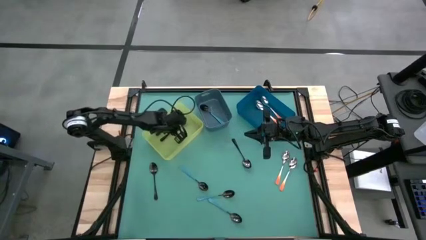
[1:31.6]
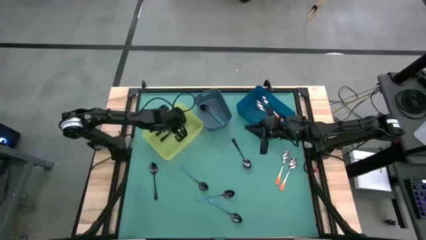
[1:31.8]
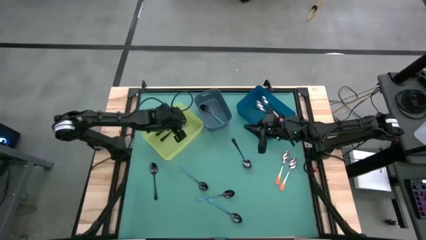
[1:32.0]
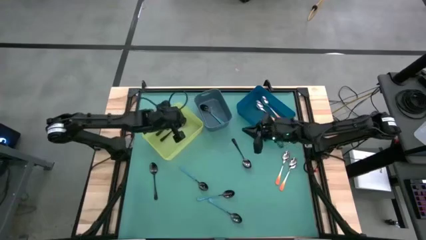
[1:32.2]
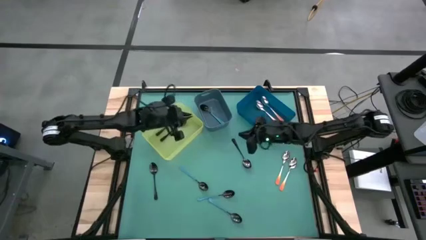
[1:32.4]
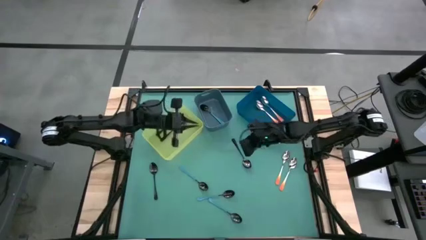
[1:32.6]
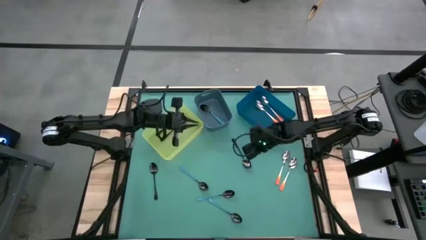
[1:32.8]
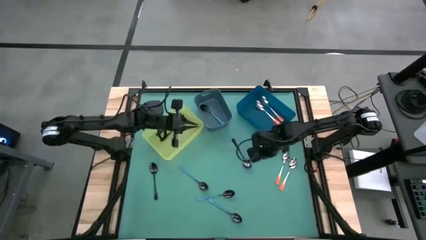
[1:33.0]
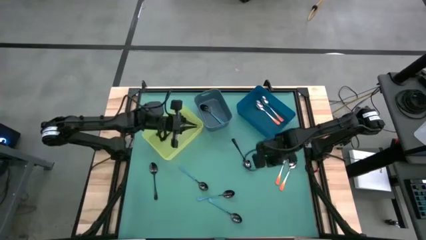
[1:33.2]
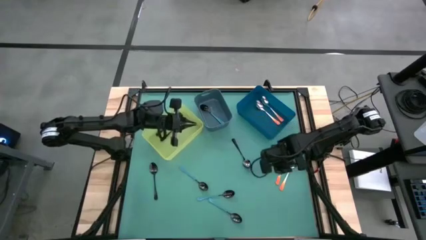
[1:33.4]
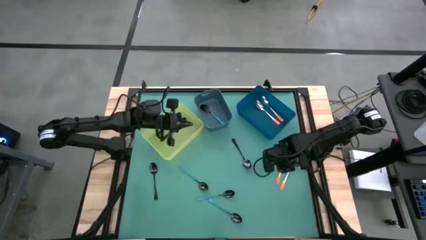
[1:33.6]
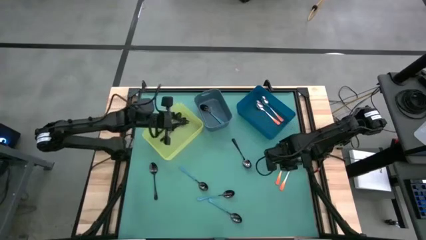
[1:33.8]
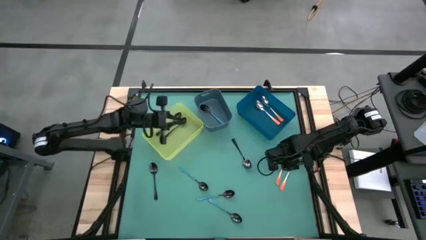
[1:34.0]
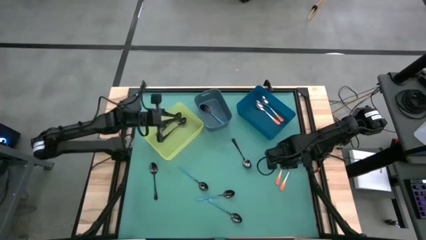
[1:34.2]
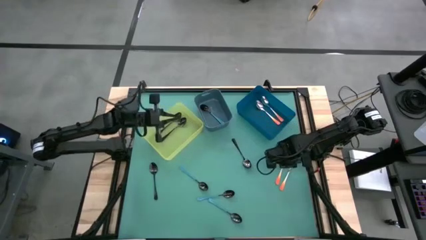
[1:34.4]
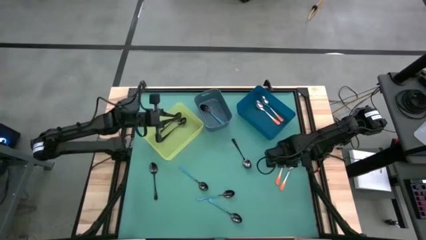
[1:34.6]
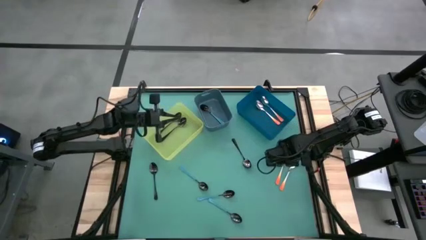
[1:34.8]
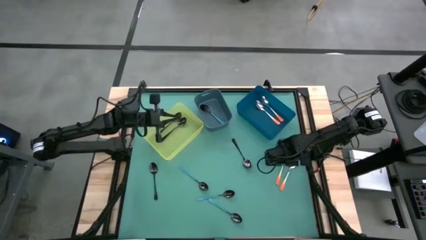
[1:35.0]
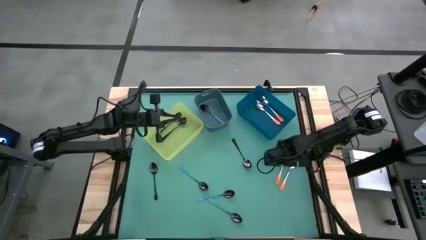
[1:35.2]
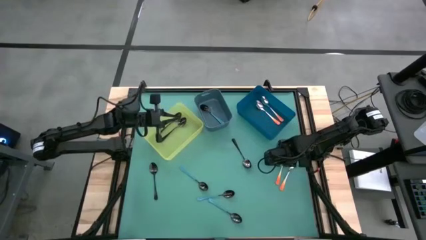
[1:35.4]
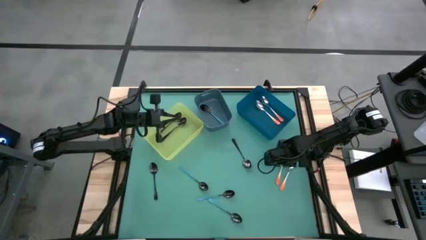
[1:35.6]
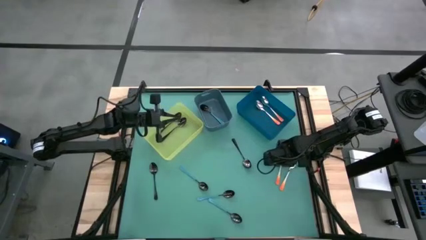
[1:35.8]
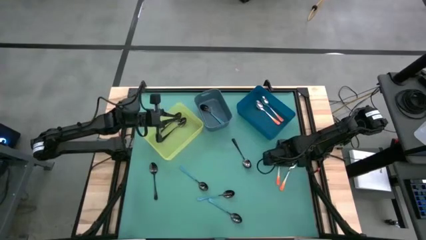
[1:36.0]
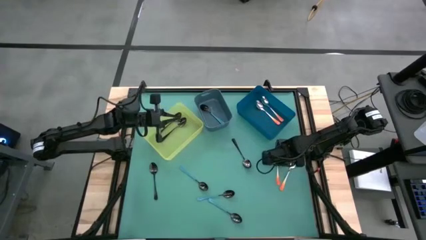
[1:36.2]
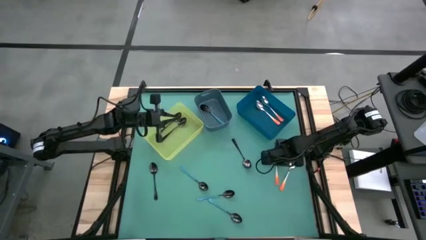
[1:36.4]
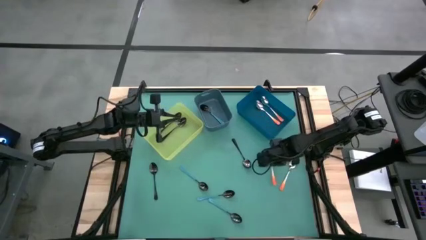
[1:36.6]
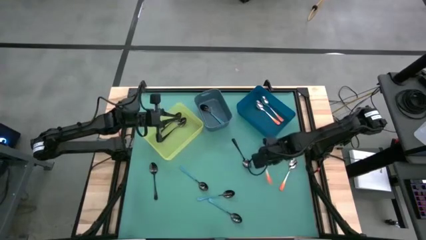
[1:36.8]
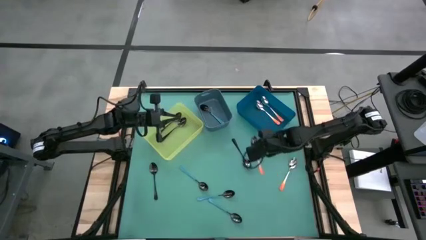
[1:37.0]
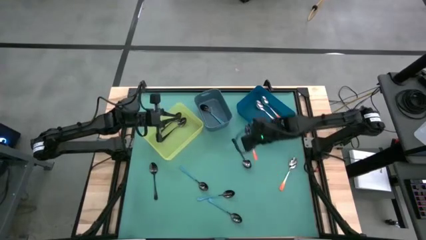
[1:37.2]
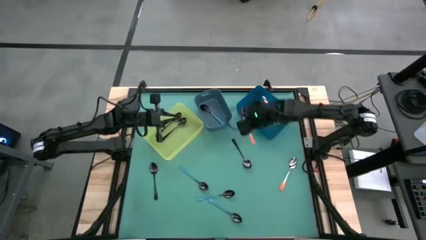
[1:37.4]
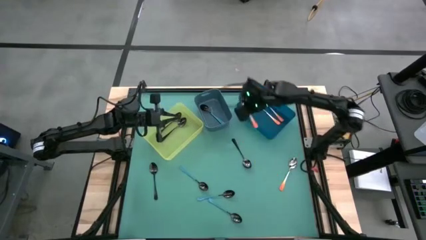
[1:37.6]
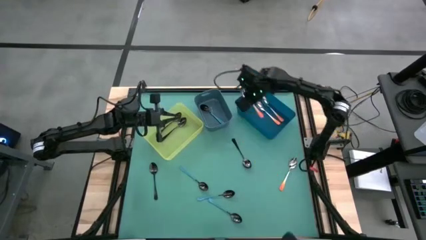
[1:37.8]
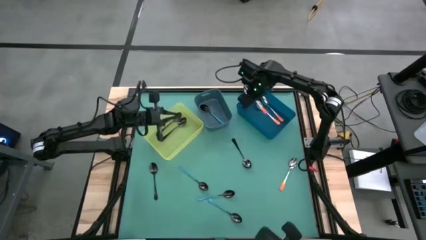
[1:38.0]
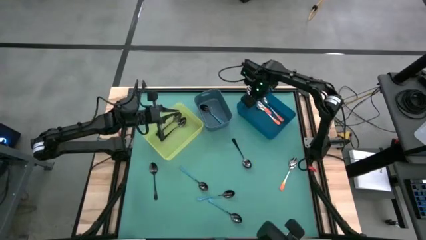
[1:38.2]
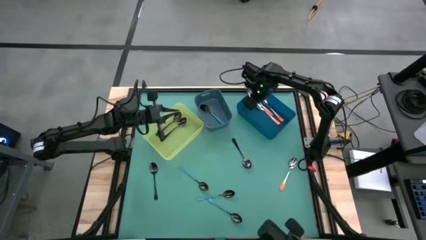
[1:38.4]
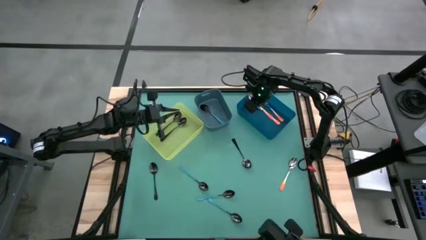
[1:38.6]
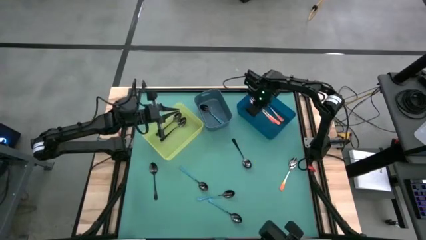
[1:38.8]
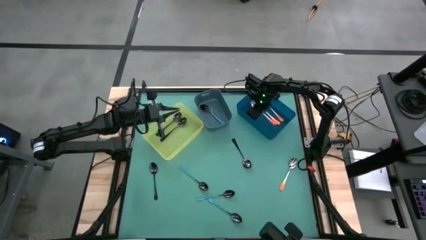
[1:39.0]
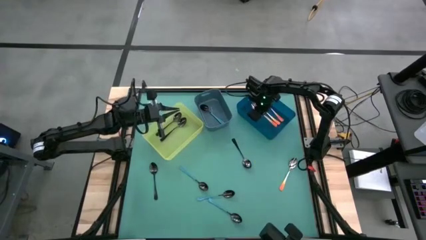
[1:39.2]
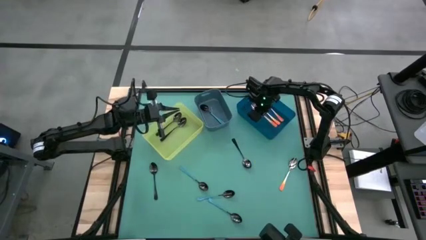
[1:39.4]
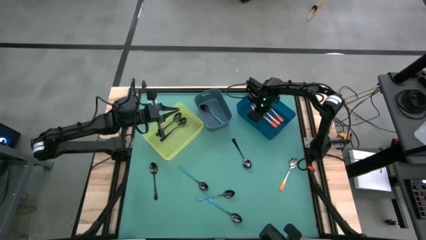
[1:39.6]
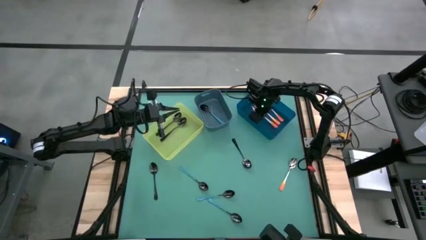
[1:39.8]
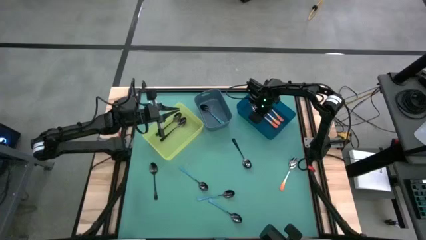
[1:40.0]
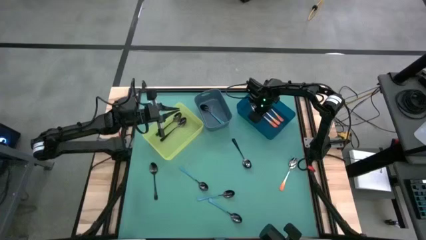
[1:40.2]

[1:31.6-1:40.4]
Task: Sort silverware by color (type)
Put the orange spoon into the blue bin

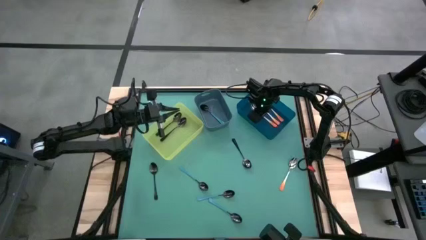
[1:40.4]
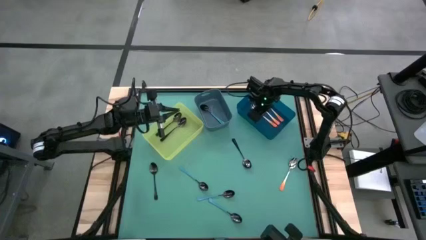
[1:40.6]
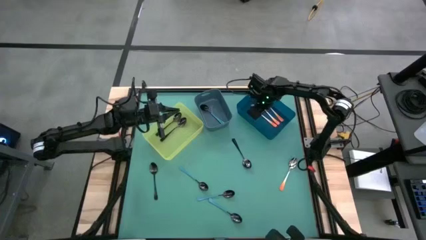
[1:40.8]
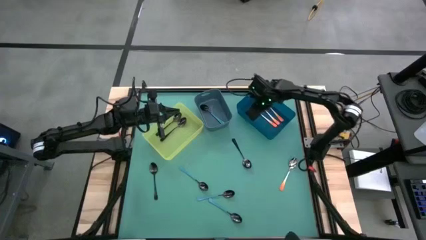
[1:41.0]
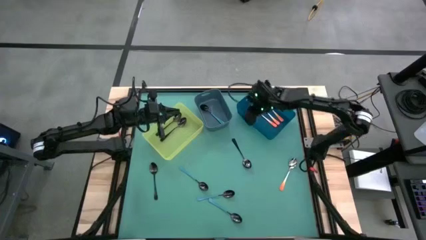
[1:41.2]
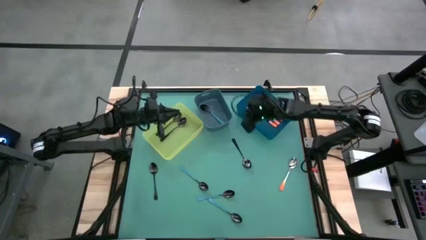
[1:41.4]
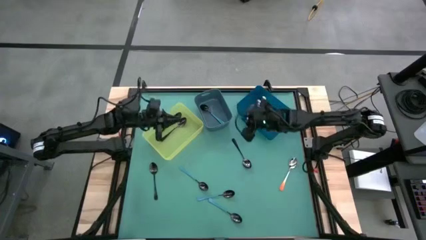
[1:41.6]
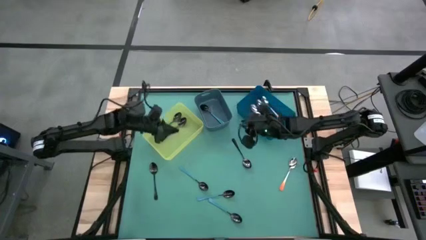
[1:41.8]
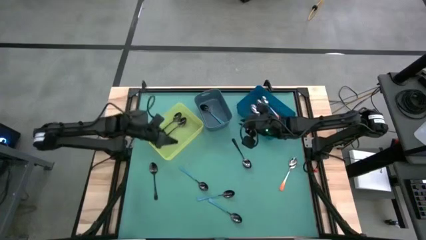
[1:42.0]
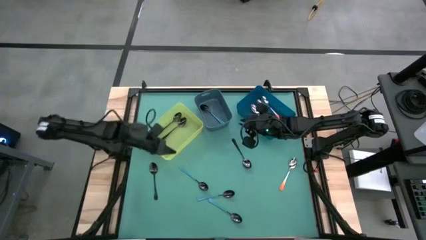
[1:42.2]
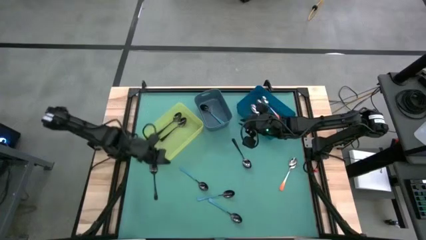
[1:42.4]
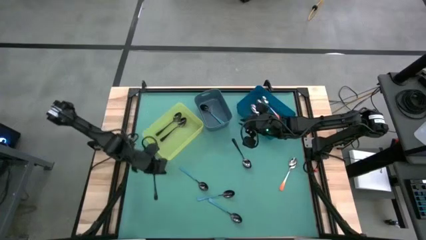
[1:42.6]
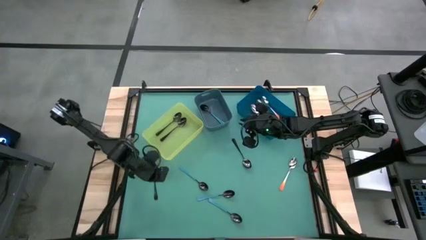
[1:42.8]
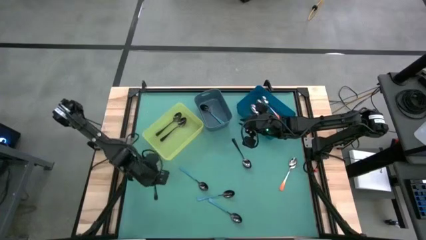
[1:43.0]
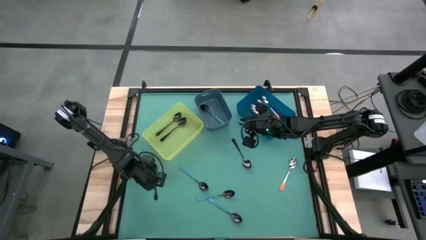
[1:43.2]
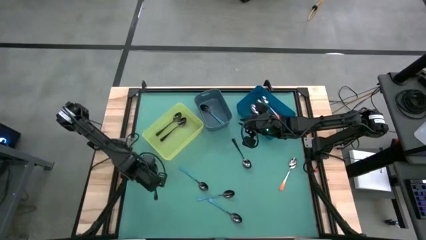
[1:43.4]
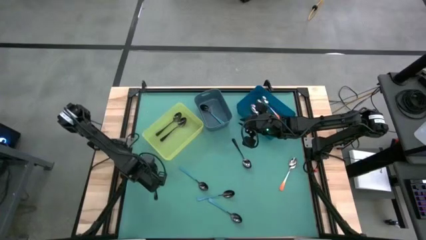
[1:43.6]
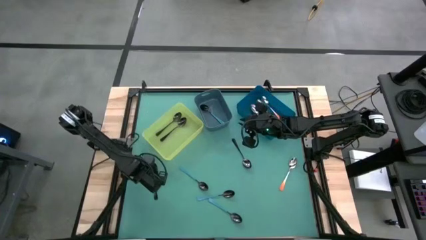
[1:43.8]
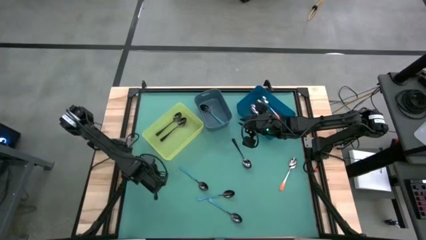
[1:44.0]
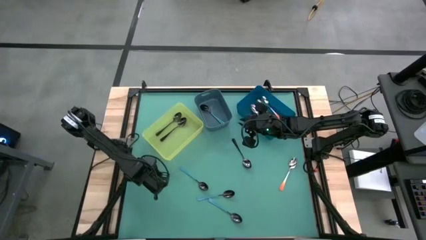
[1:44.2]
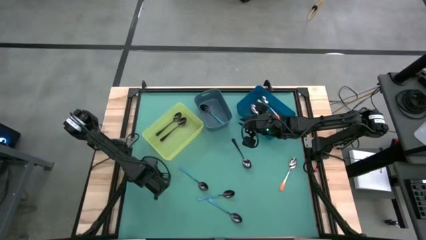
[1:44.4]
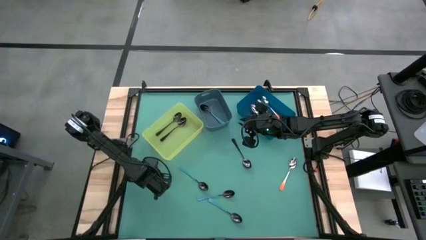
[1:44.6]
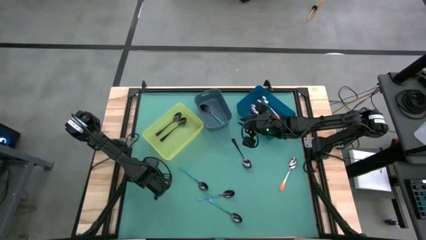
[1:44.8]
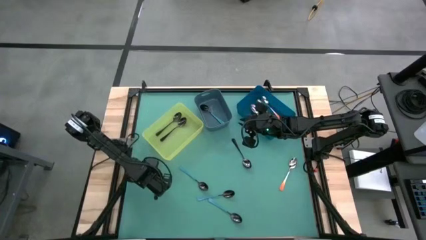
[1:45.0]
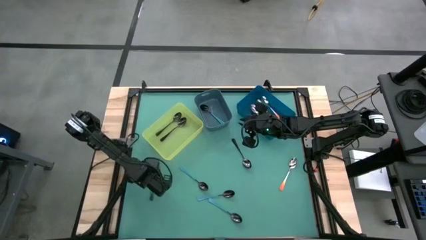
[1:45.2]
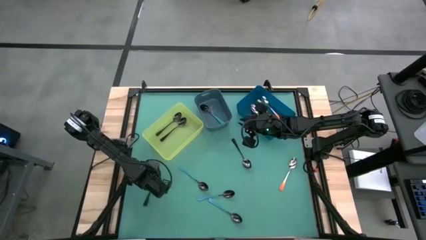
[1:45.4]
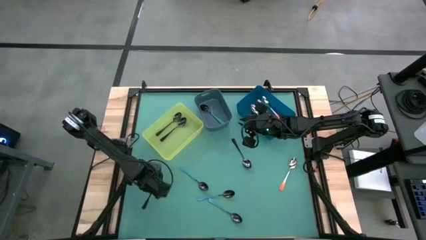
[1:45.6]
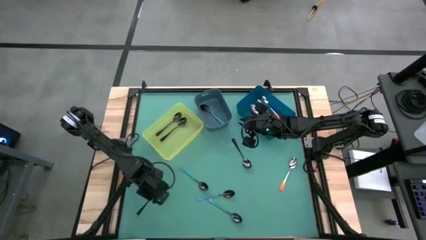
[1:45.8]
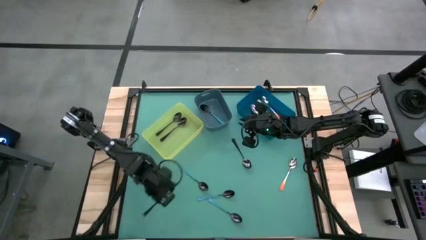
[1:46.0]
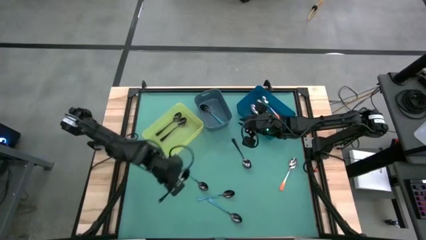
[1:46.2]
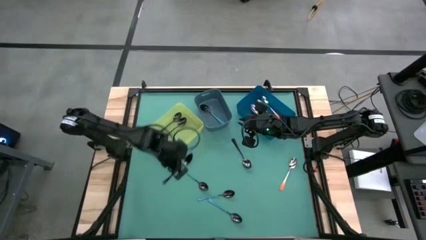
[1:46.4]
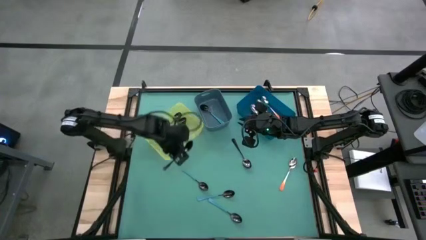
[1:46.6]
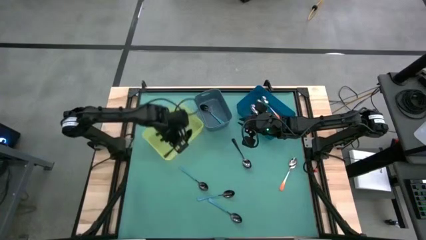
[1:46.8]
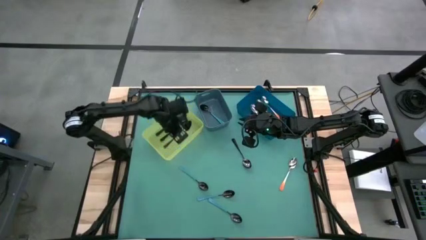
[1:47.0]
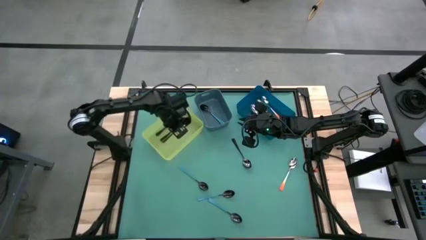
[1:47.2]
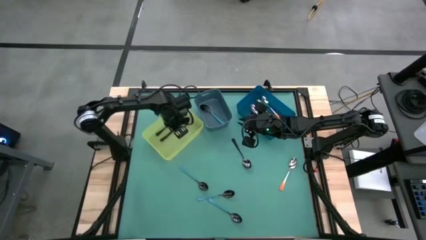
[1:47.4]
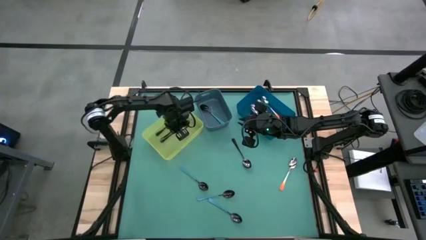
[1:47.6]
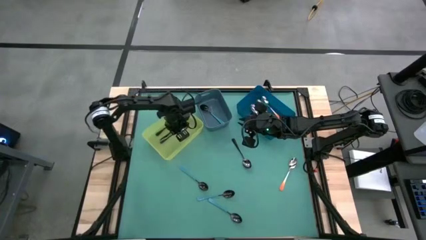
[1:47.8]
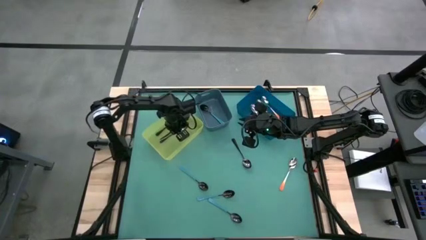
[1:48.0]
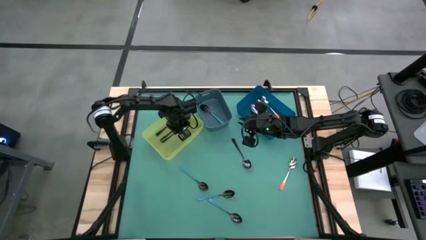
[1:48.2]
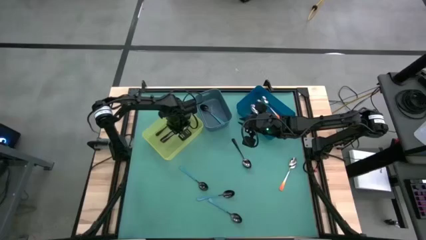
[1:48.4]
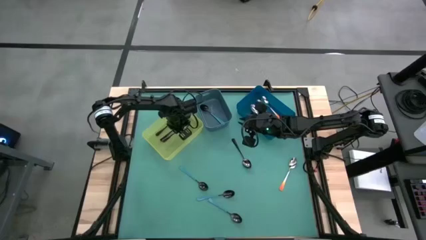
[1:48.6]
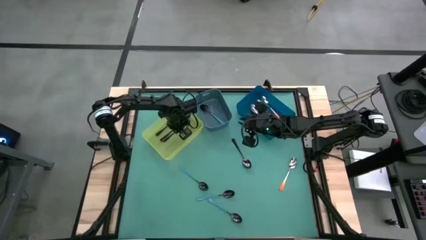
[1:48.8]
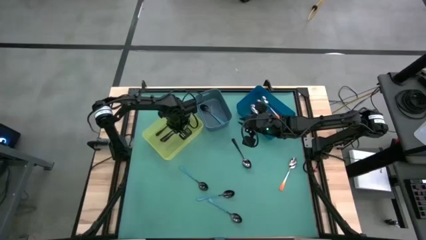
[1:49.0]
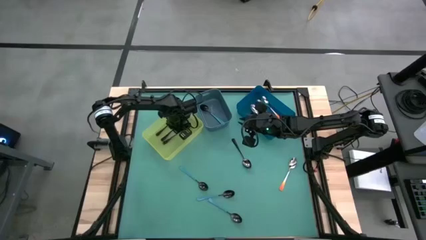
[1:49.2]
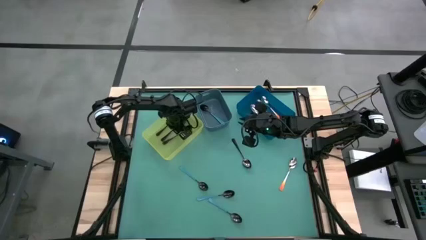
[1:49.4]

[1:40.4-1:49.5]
Put the black spoon into the yellow bin
